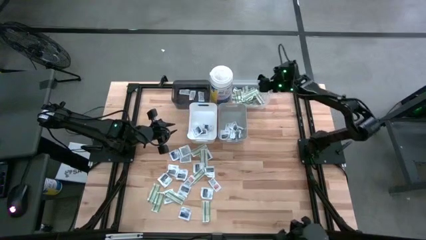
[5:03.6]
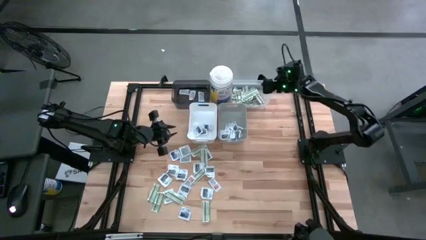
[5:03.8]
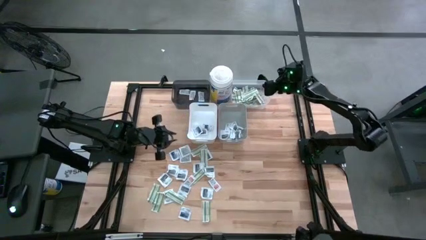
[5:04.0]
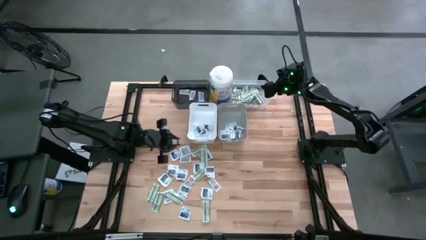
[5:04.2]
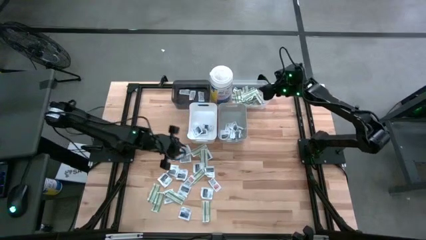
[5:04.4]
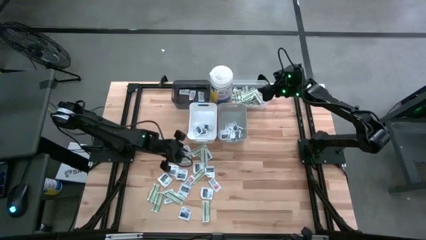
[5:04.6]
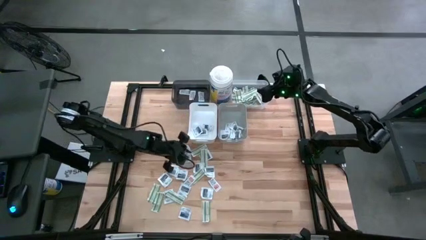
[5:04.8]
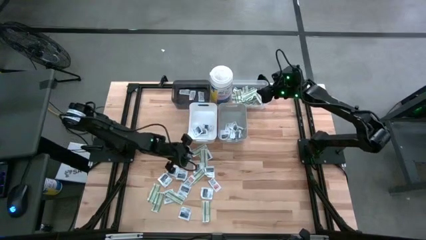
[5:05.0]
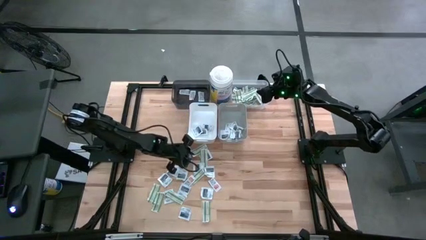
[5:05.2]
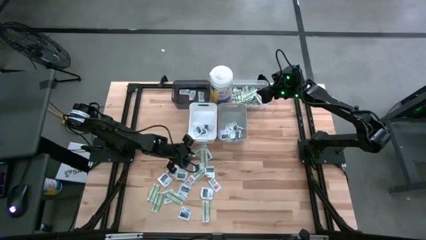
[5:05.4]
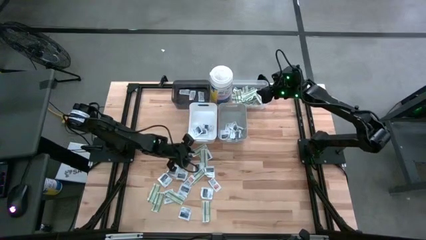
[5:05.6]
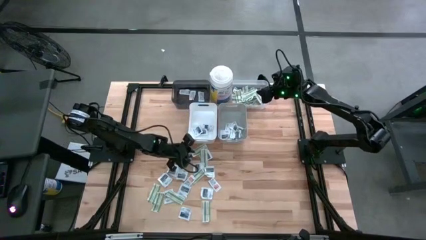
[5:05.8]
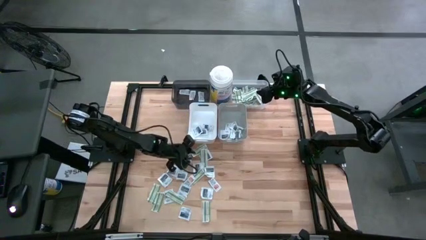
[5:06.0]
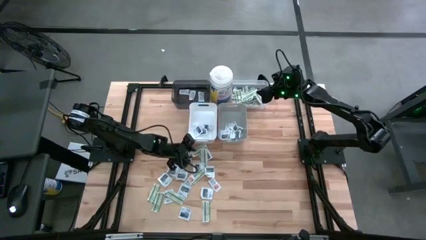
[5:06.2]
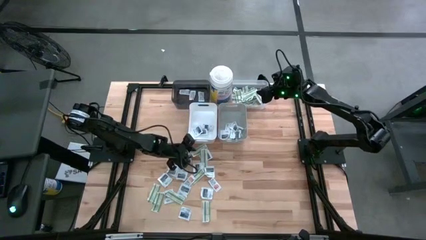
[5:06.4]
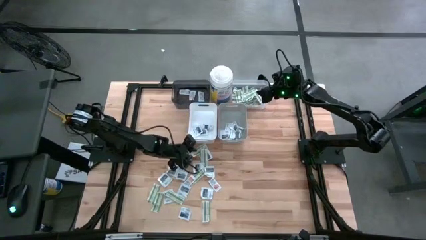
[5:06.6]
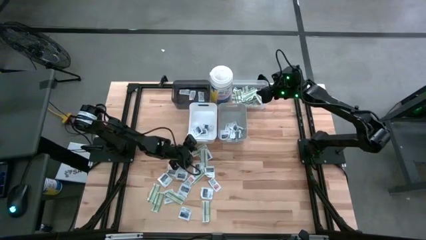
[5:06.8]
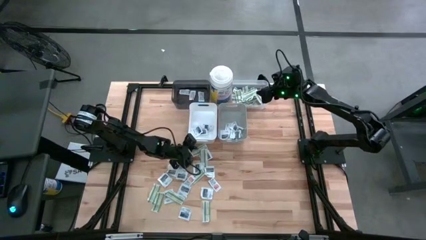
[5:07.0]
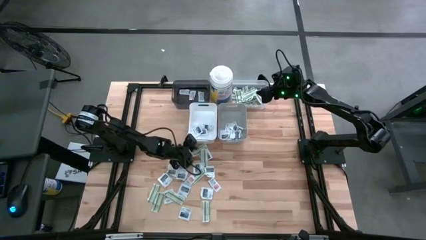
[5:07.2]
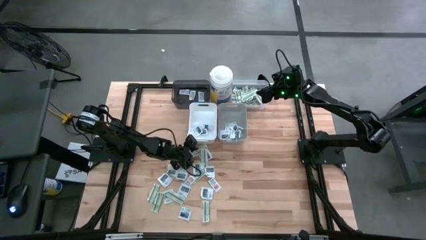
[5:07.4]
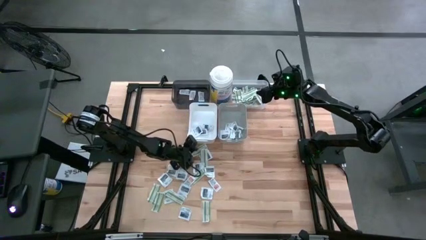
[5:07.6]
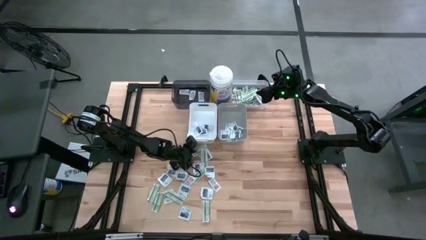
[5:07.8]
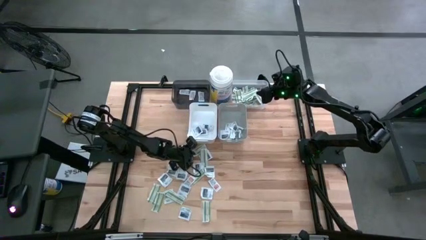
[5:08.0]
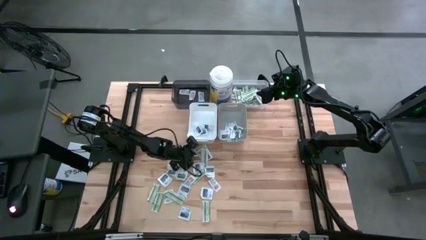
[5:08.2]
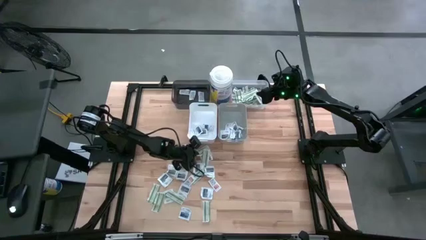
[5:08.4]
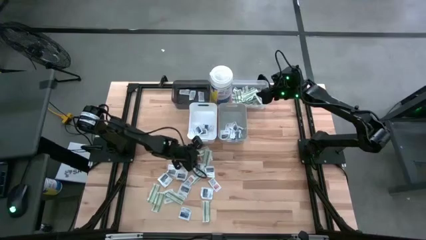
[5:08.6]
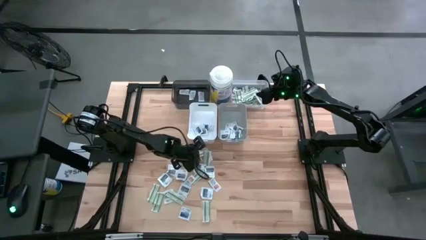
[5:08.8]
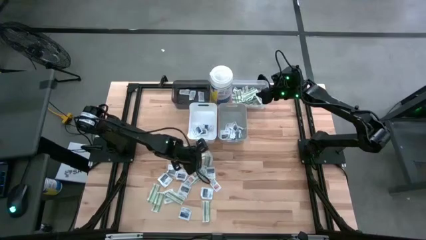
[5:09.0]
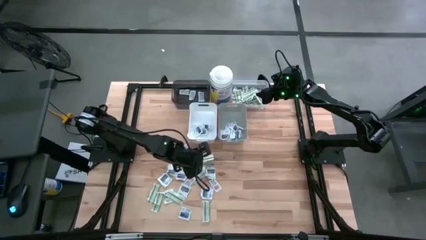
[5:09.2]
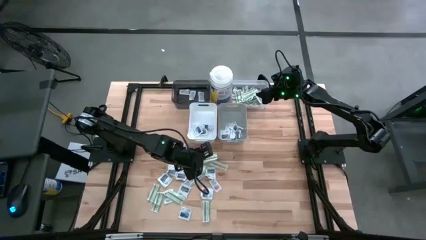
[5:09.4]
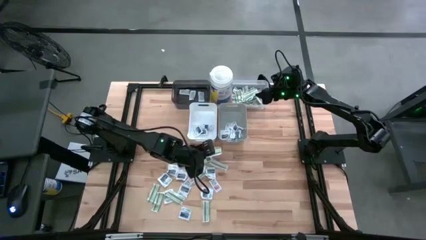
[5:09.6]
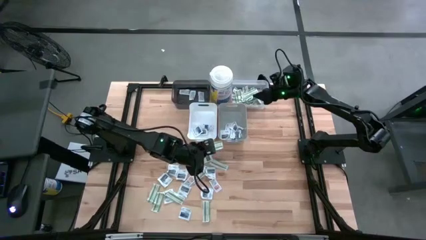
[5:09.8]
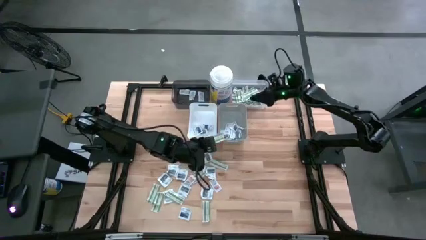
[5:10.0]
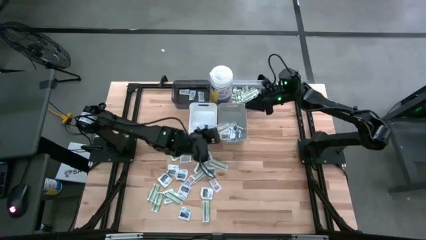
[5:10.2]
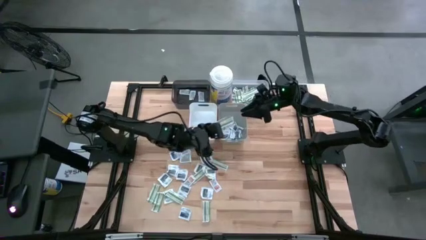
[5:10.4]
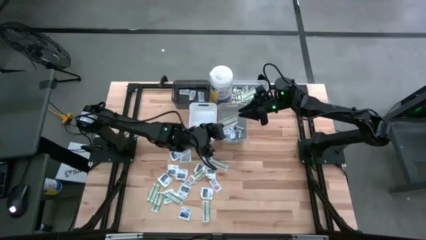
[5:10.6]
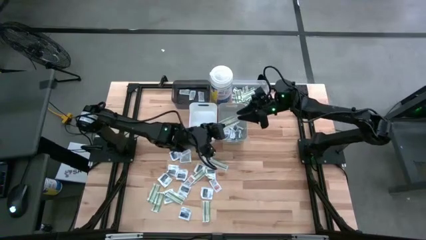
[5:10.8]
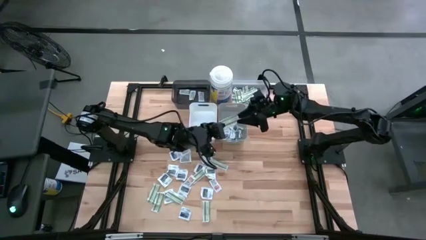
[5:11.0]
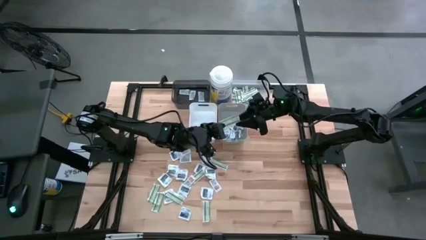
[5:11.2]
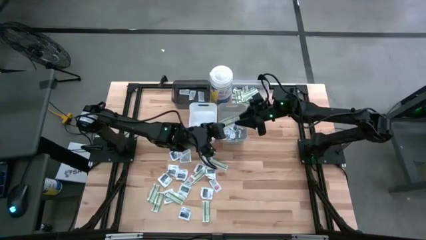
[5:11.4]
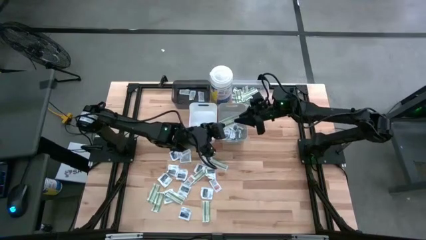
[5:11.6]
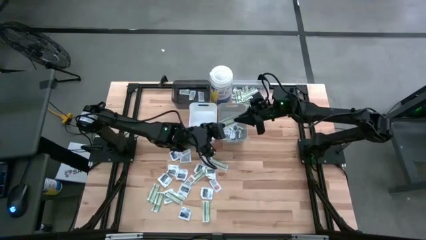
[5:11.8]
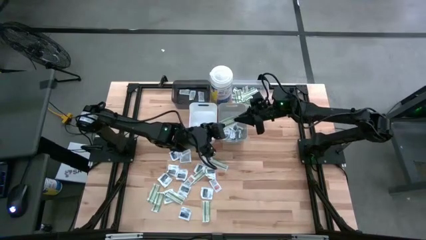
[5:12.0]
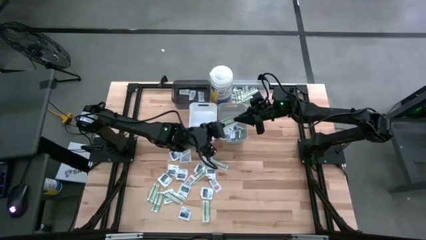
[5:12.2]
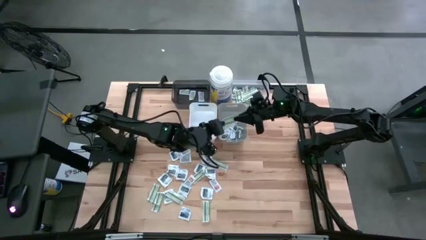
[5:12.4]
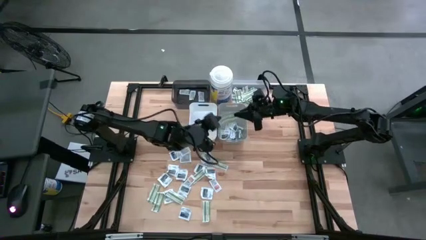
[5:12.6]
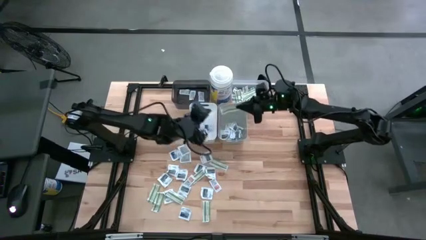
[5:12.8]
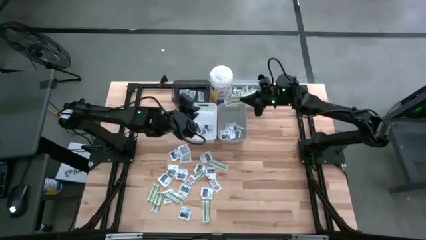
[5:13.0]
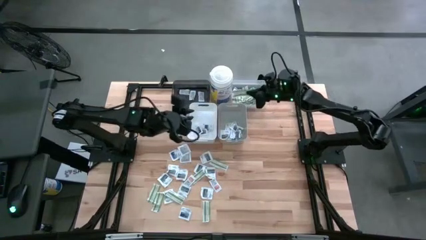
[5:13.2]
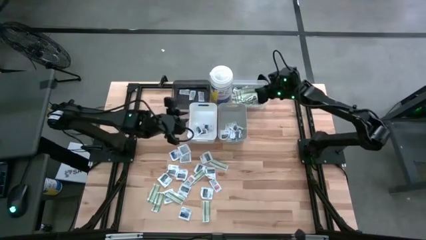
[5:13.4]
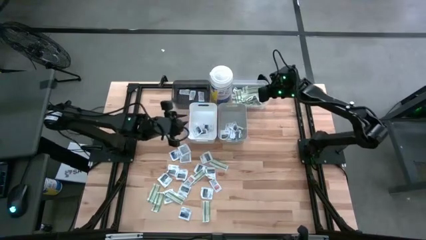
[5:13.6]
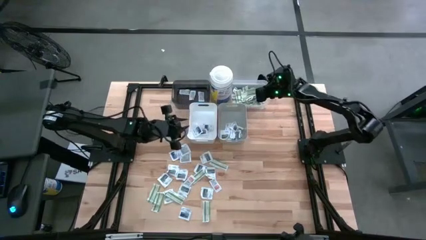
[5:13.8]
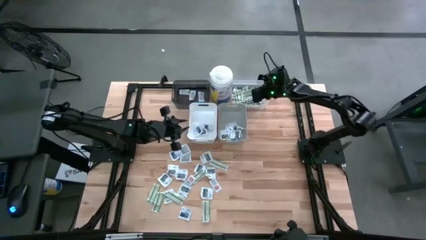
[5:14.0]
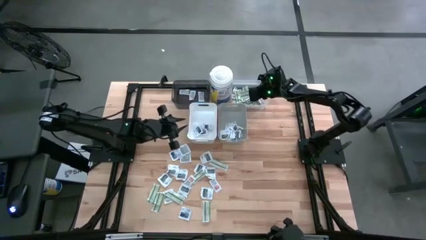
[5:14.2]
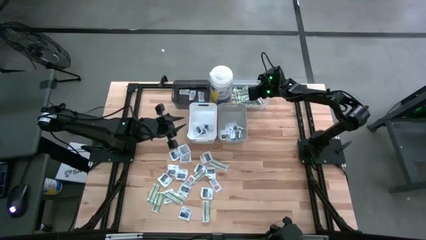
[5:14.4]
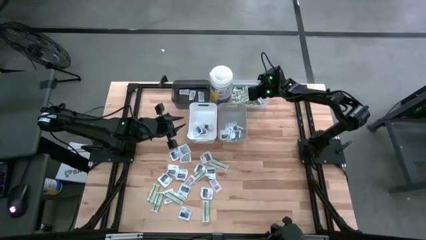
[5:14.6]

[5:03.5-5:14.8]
Task: Pick & Place First Aid Supplies
Put the band aid into the transparent bin

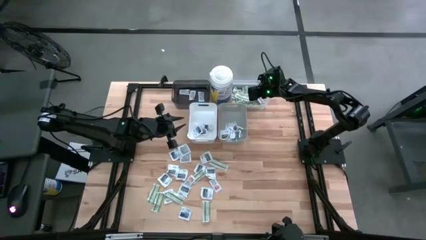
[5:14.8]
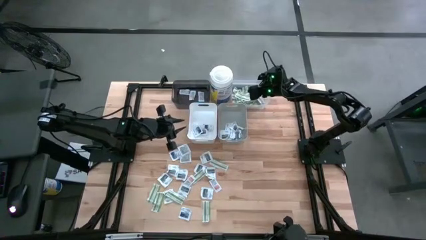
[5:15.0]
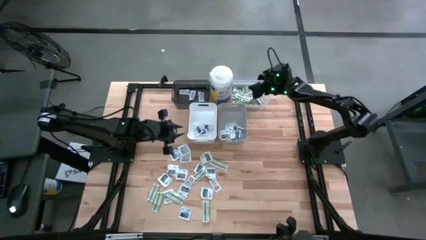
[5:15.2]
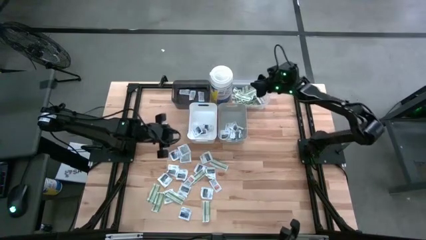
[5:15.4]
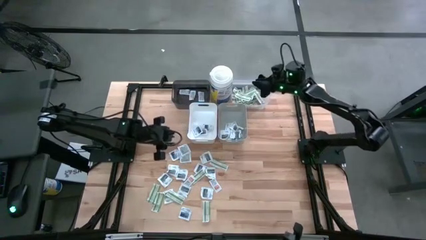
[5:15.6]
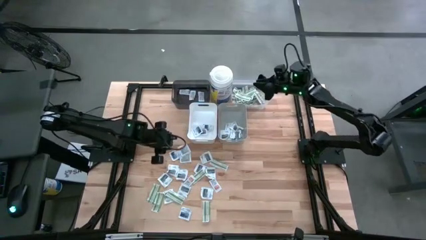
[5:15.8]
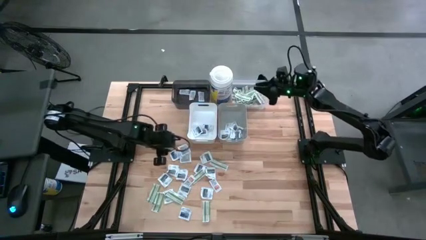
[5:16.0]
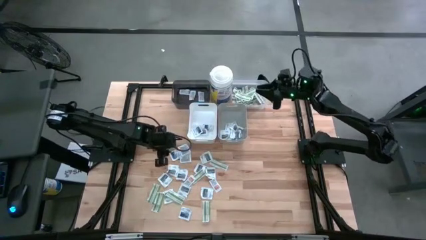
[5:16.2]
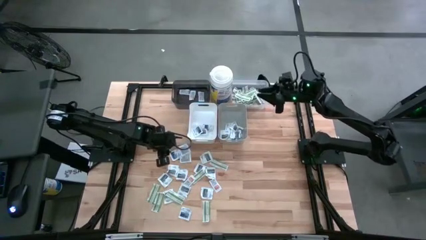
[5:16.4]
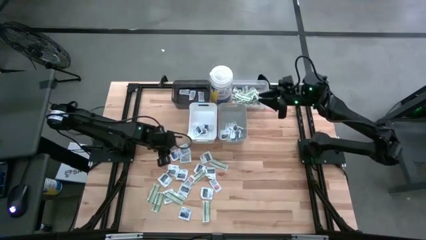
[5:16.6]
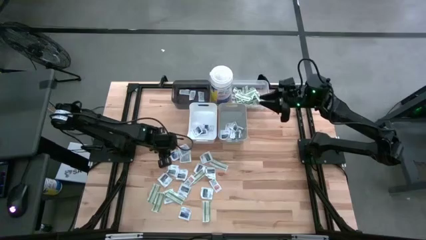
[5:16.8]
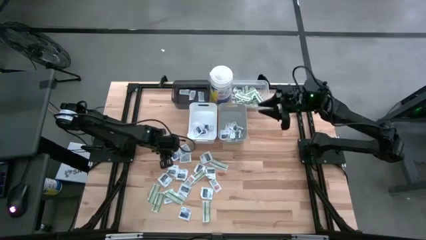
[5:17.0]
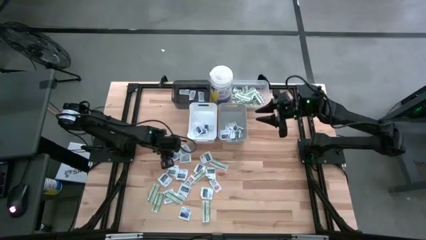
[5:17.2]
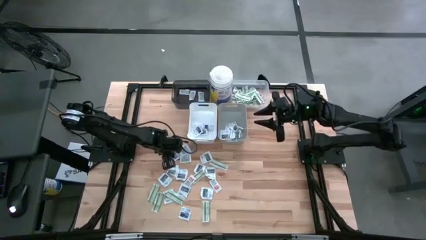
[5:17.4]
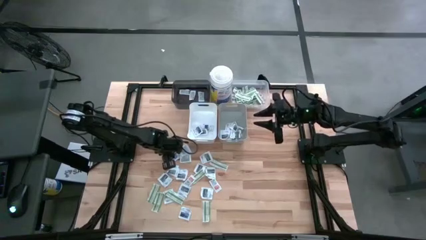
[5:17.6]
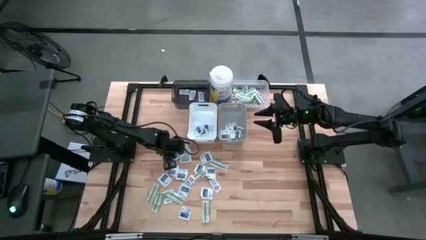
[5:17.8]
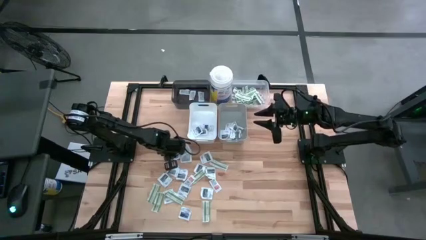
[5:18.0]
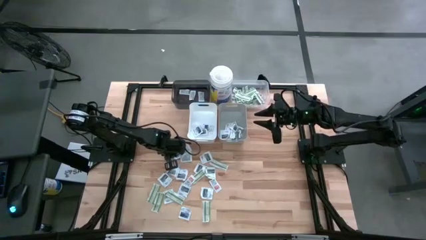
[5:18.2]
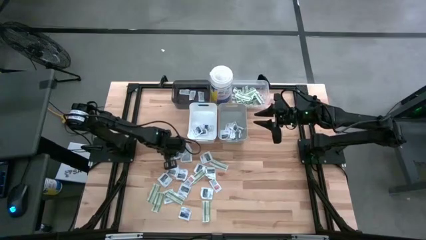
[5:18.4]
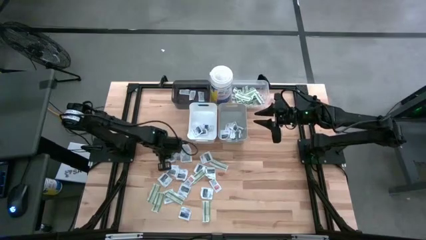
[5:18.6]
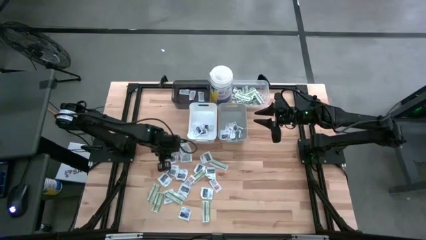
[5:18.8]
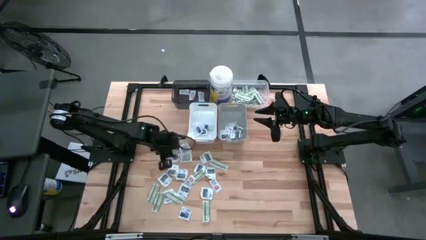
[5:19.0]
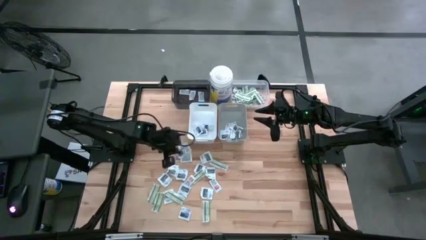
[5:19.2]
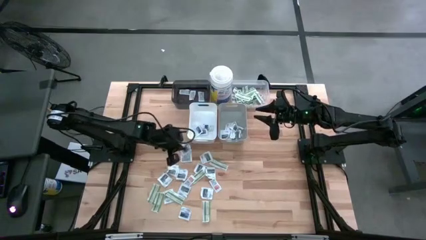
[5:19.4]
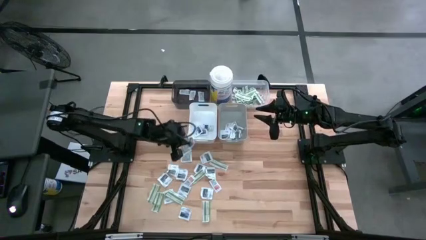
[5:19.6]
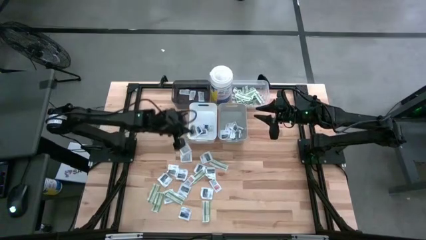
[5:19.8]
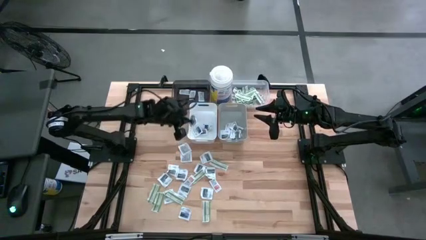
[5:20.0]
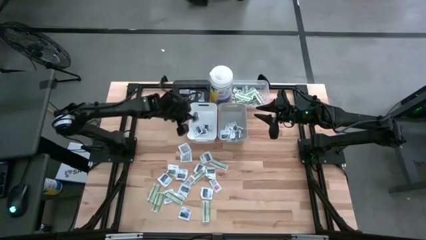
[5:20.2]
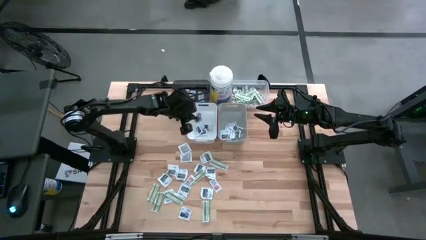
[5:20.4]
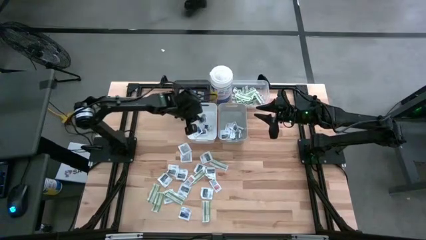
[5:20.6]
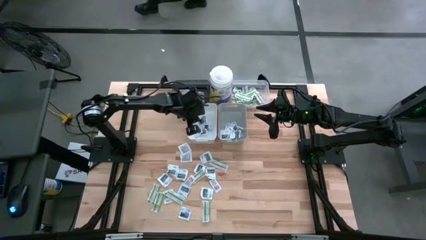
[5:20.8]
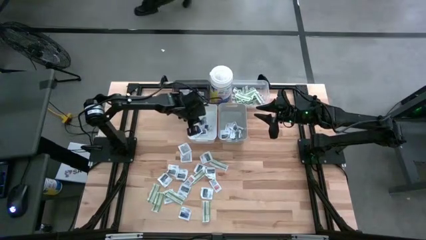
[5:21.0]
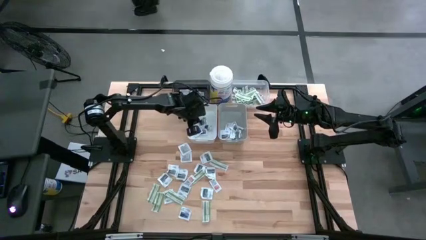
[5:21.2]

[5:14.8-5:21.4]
Put the alcohol wipe into the white bin
